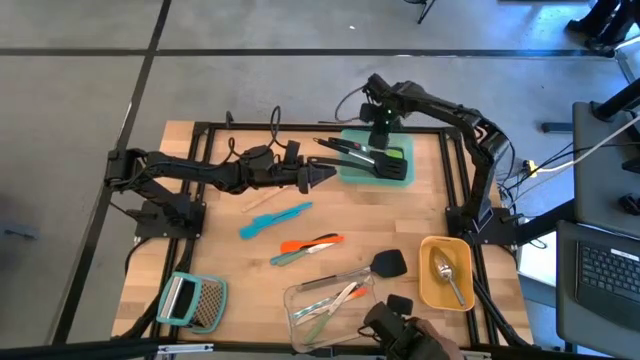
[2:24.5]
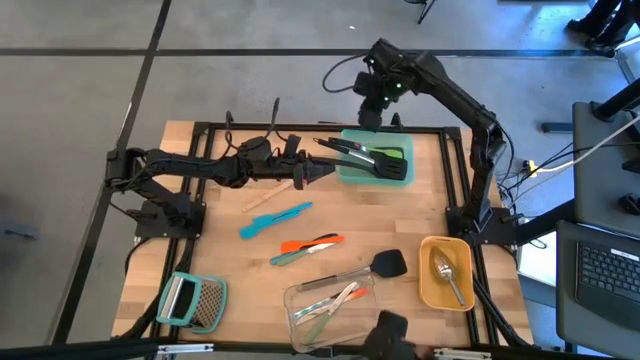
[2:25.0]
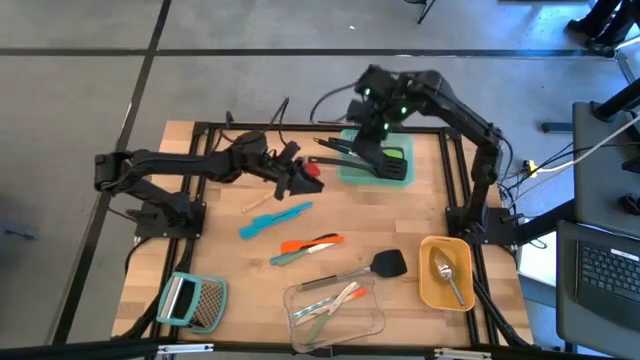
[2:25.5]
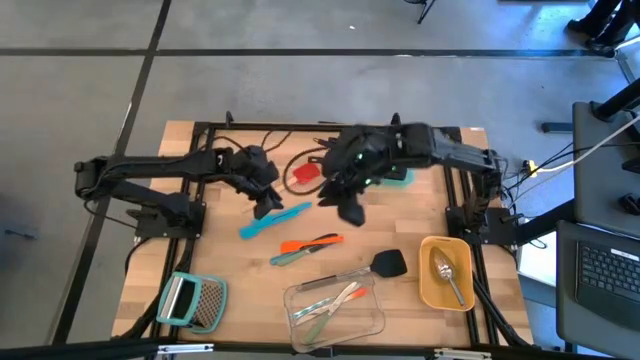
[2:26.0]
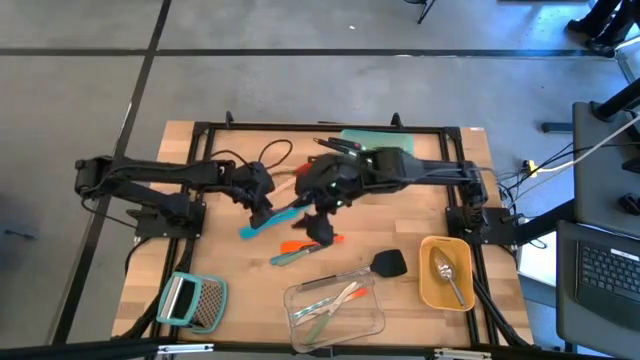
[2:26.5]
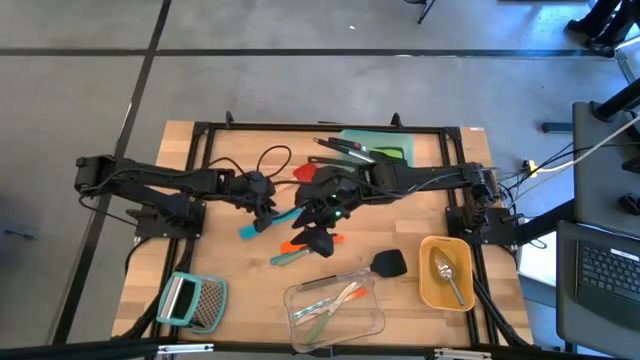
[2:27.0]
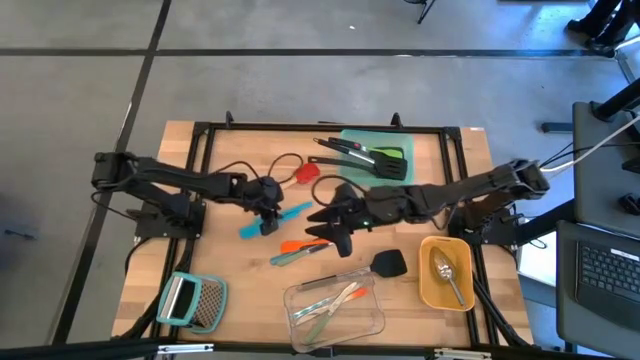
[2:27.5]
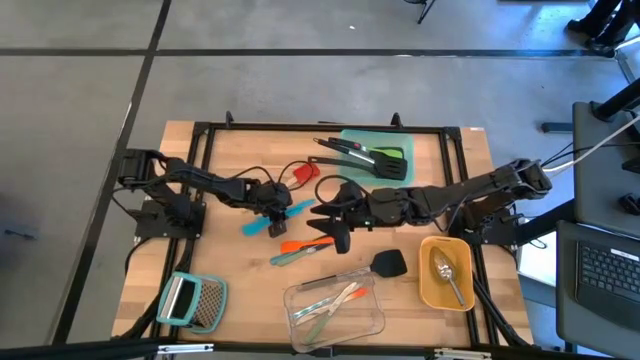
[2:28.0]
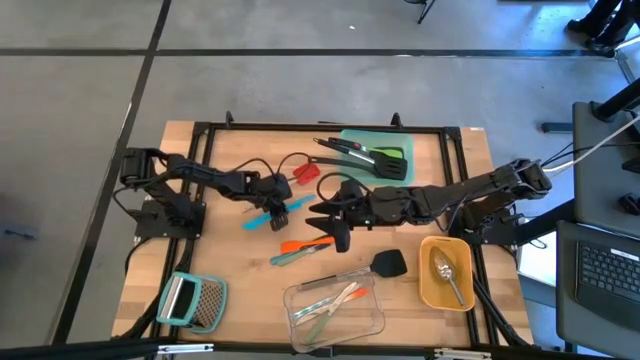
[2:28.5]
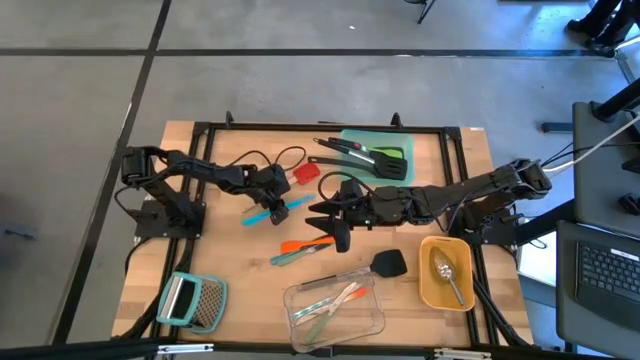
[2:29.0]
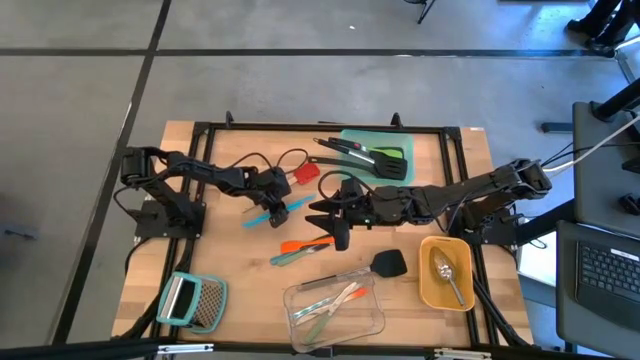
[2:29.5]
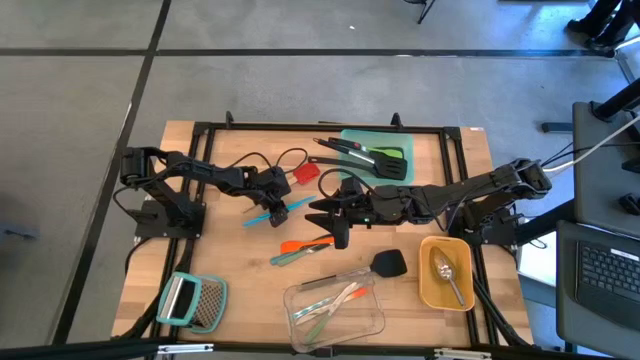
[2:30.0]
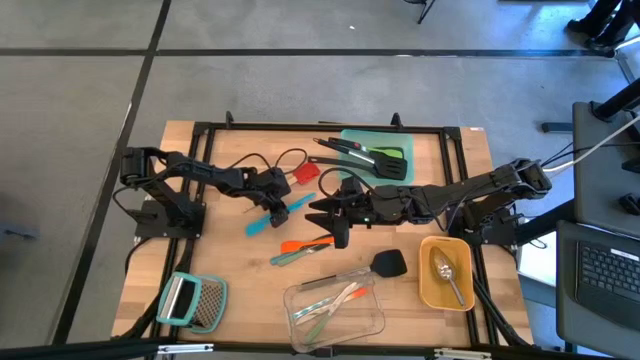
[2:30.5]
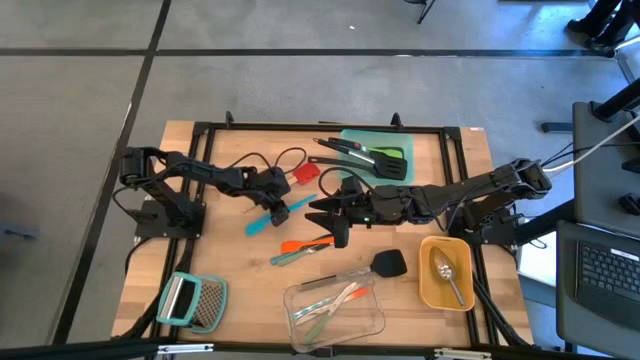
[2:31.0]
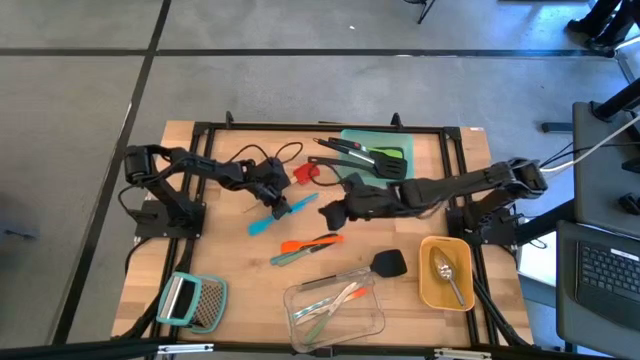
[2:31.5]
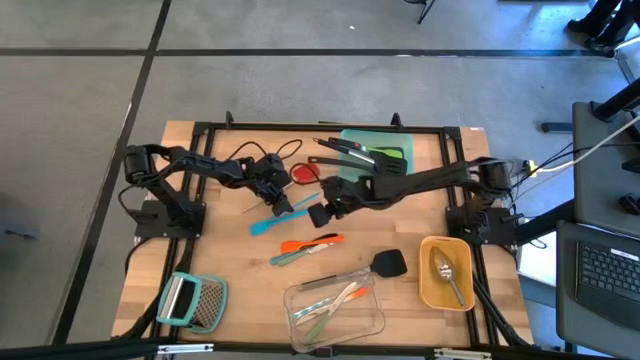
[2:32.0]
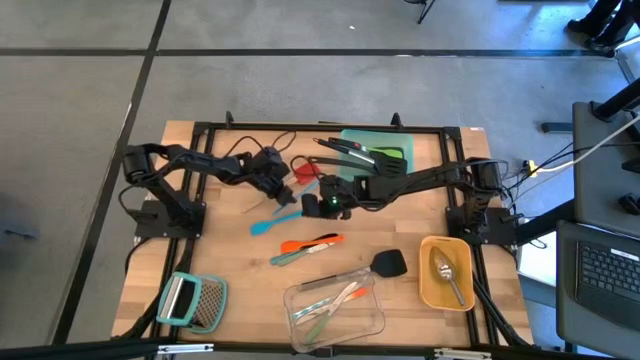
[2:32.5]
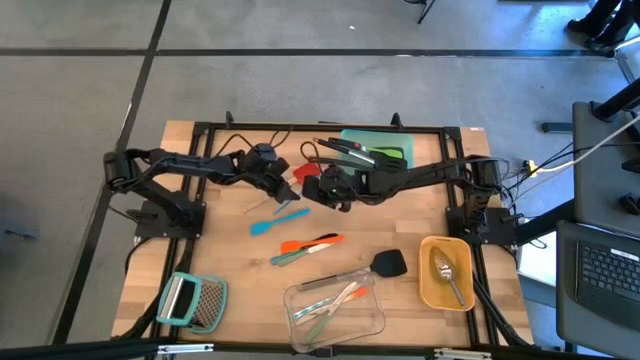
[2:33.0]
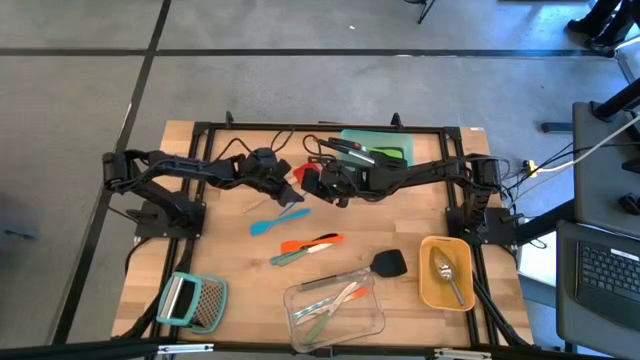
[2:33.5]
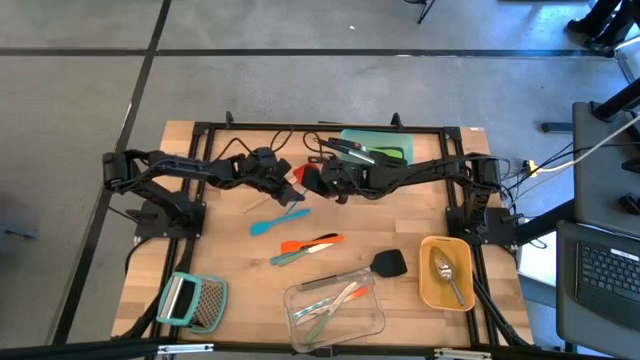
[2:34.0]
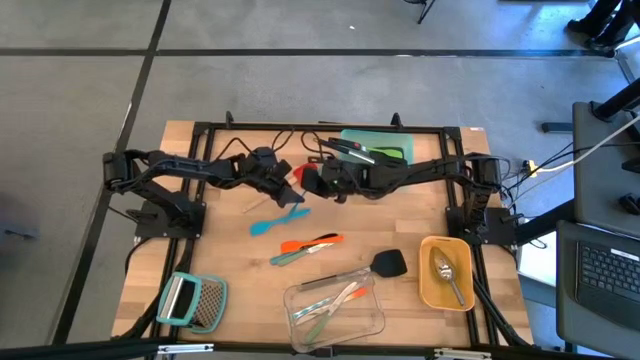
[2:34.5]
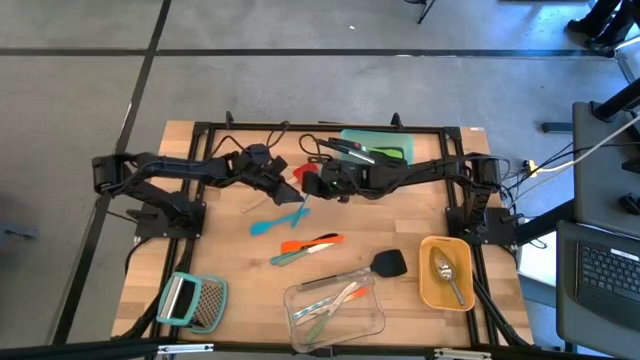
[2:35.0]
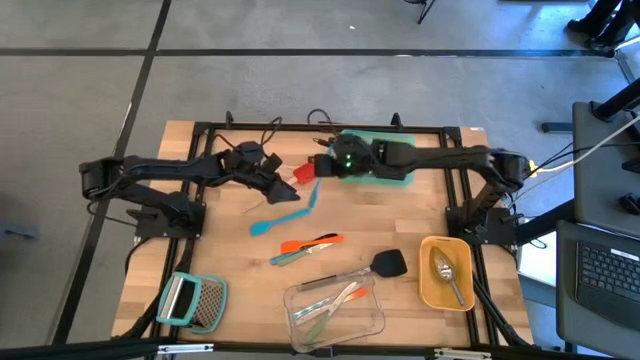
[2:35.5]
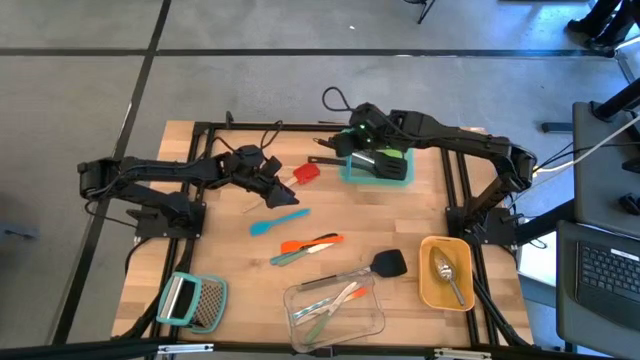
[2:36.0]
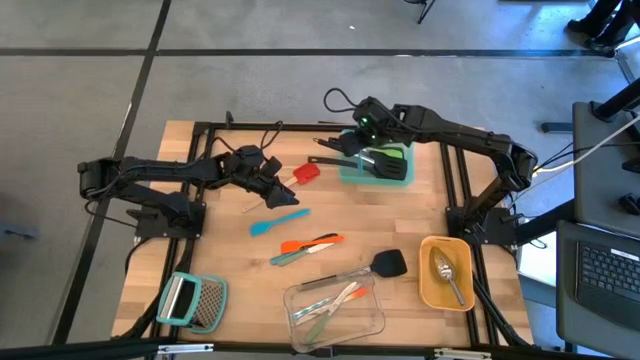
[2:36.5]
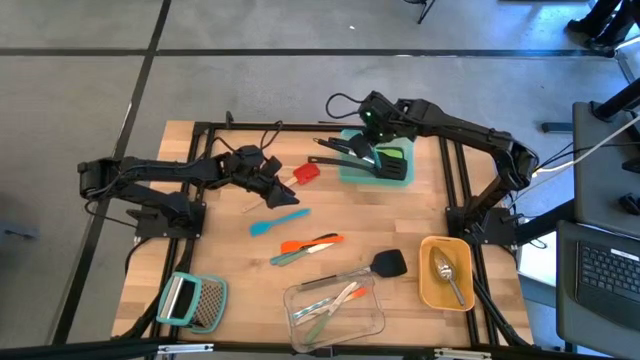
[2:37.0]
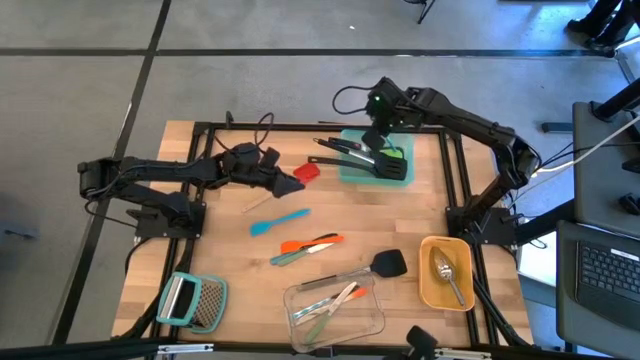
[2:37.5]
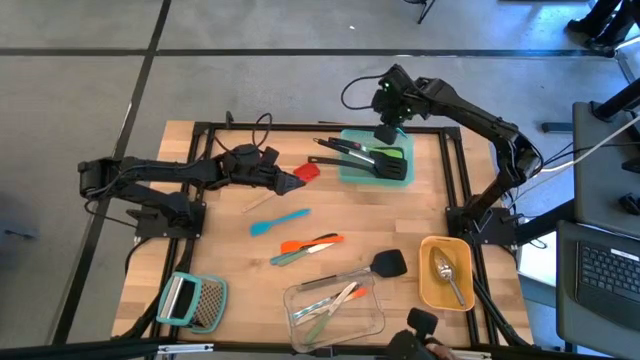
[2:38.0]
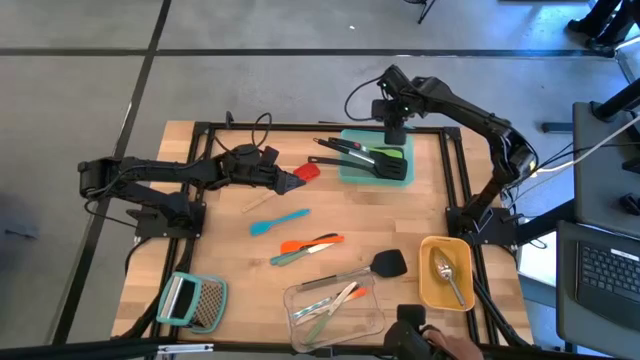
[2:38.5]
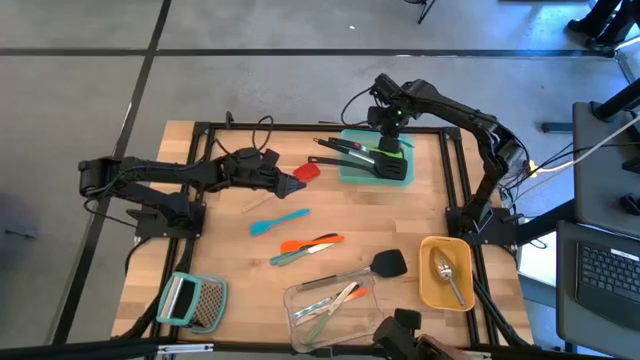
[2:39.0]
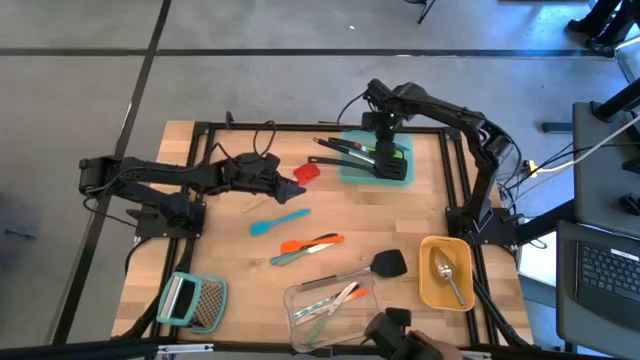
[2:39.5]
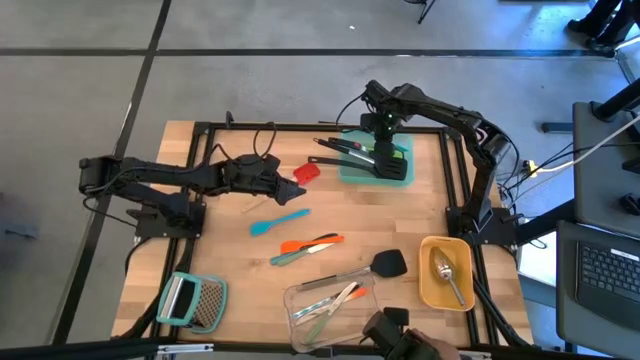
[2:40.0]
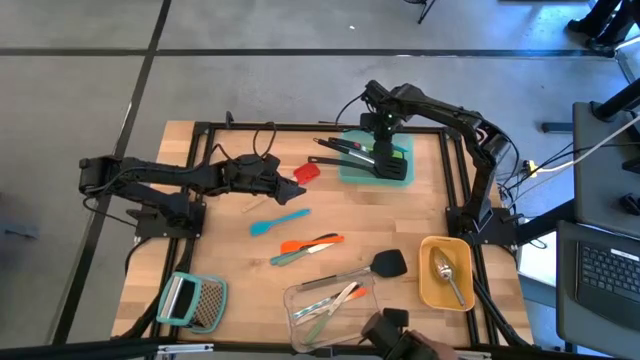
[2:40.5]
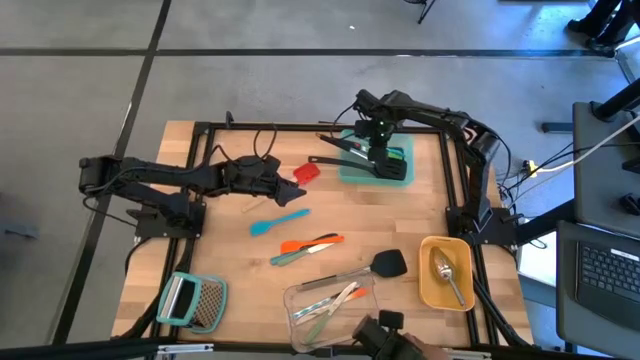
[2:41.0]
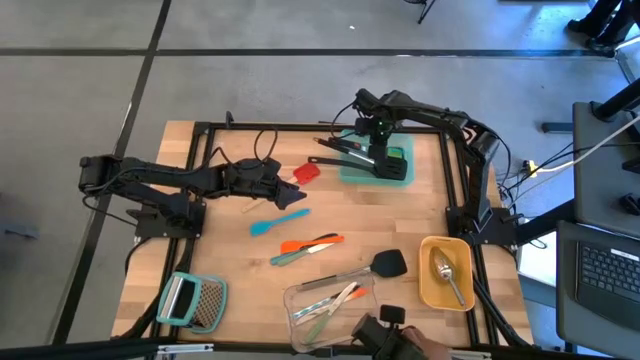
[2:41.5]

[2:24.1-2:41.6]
Task: Pick & Place Kitchen Items
Put the blue spatula into the green bin

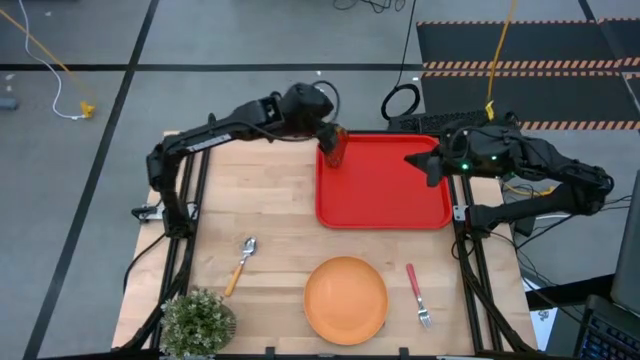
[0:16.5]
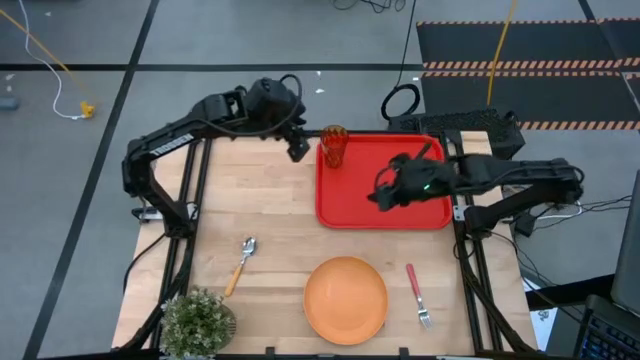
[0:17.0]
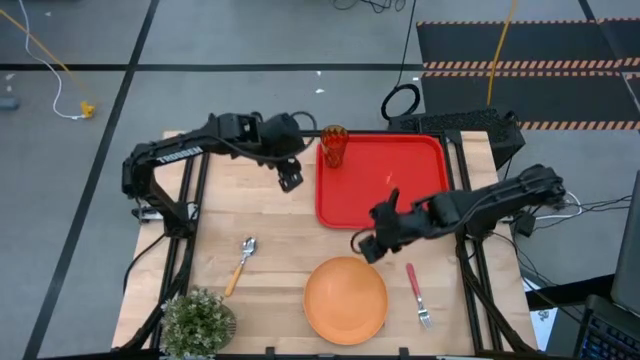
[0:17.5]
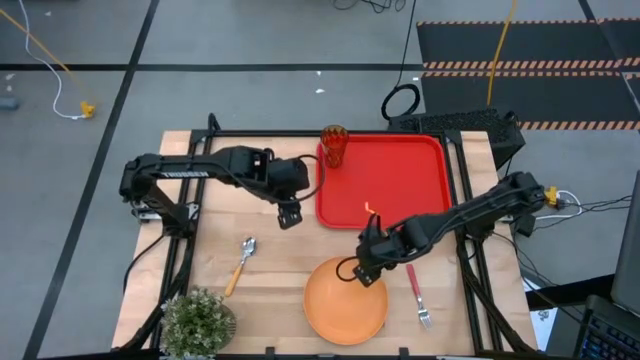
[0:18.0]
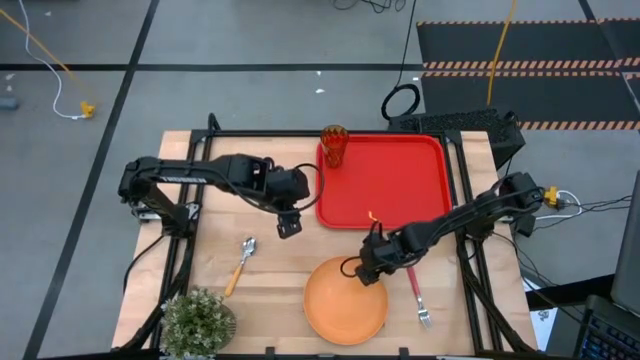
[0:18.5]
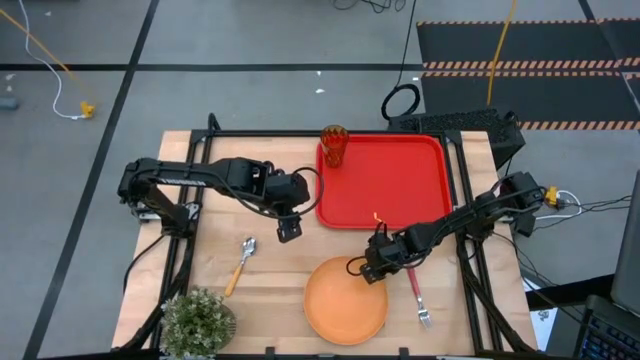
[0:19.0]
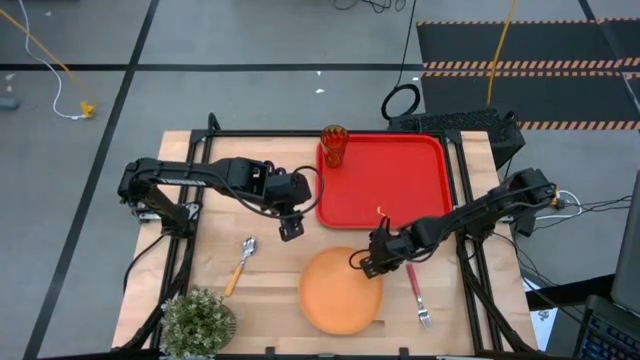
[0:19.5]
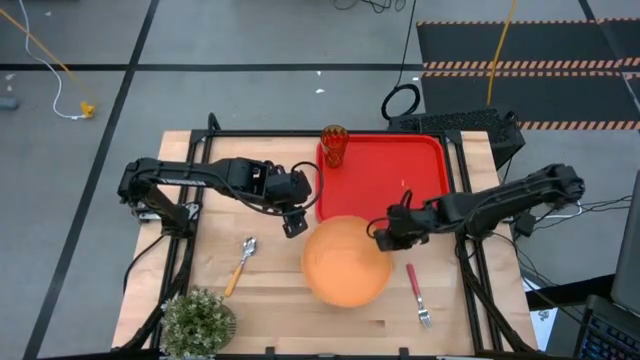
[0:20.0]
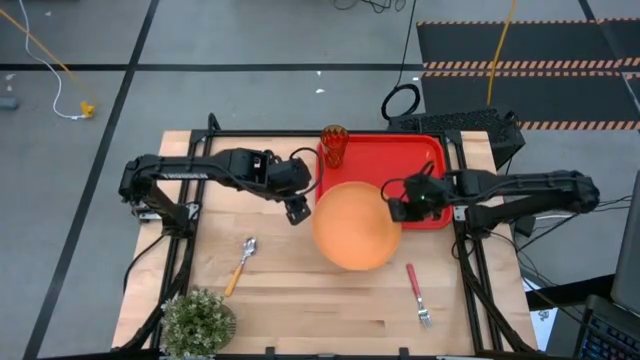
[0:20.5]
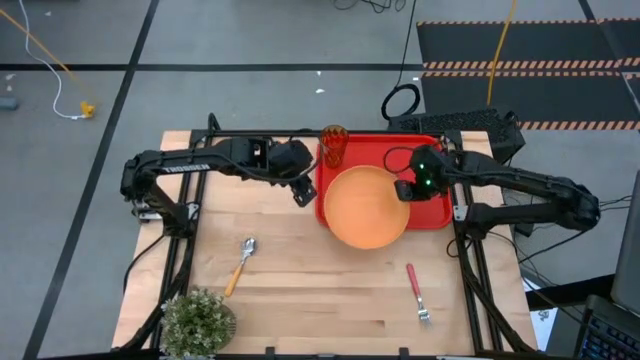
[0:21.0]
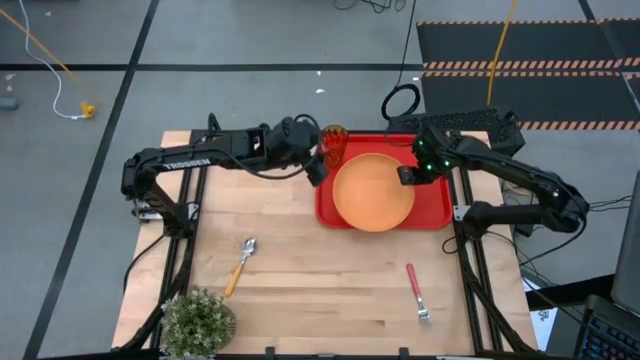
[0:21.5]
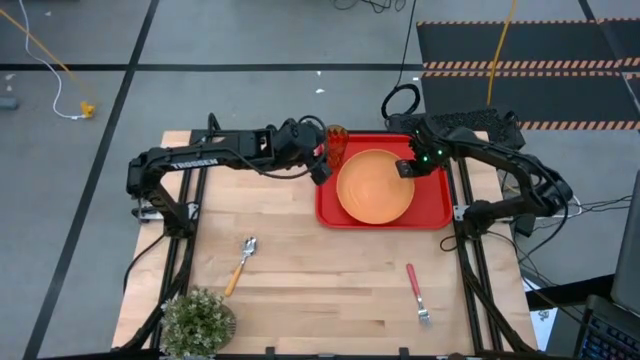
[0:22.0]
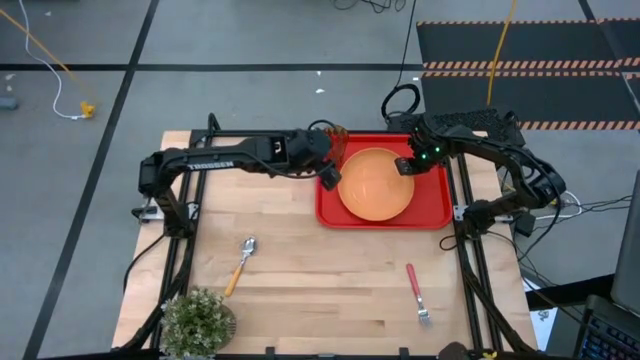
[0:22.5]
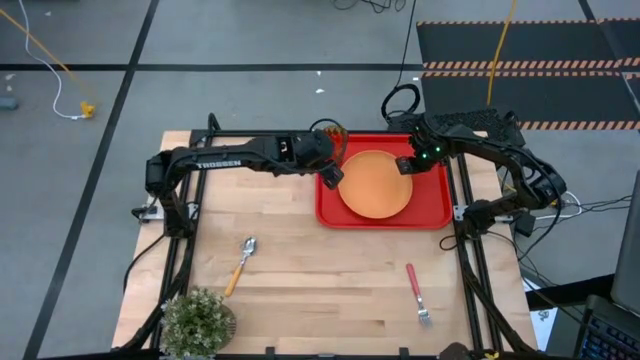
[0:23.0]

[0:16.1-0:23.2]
Task: Pick and place plate/cup/fork/spoon on tray
Put the orange plate on the red tray to the bottom right of the brown cup
